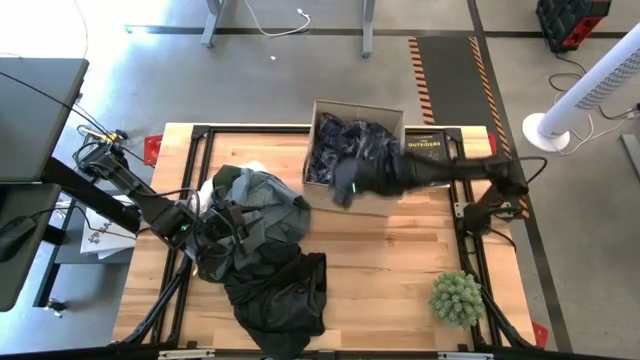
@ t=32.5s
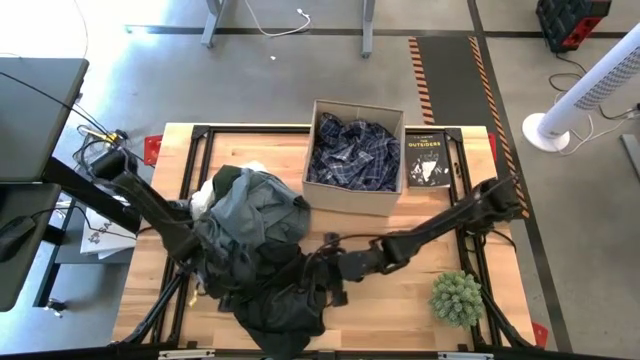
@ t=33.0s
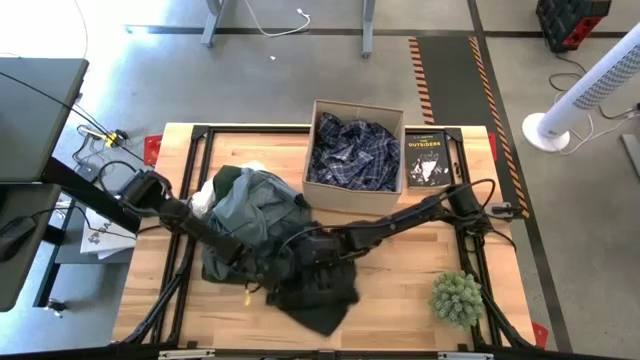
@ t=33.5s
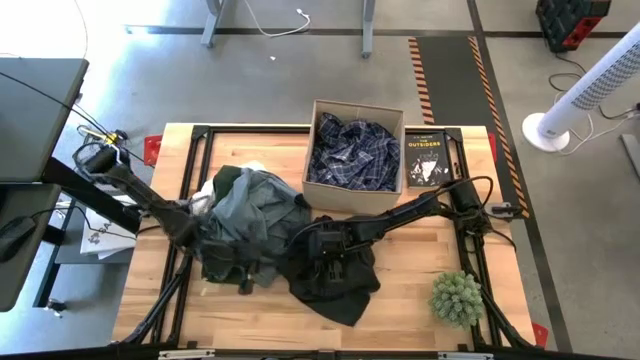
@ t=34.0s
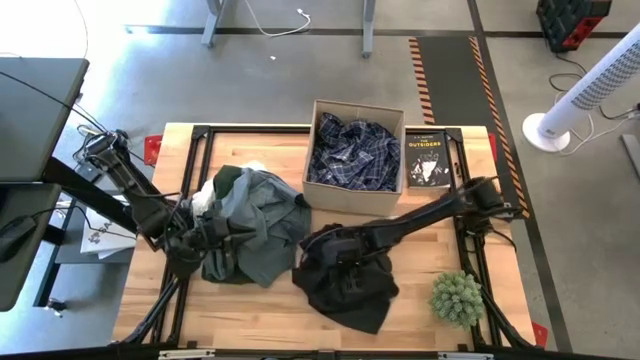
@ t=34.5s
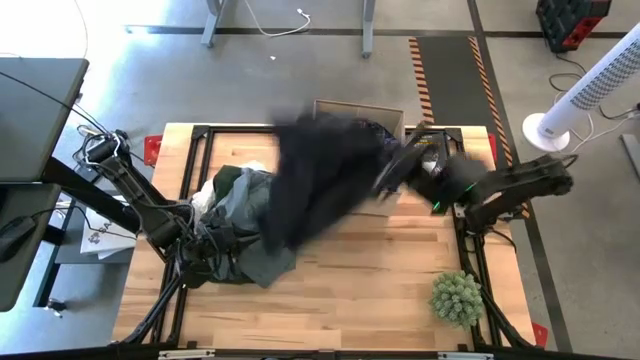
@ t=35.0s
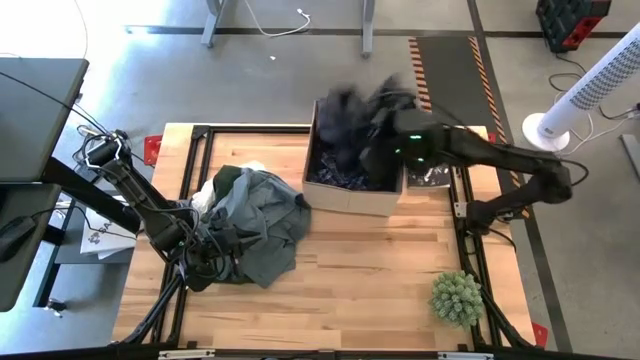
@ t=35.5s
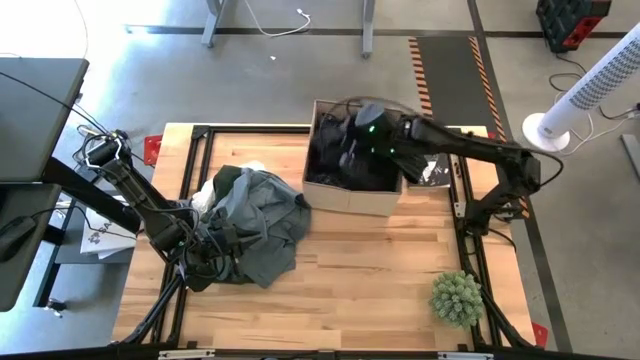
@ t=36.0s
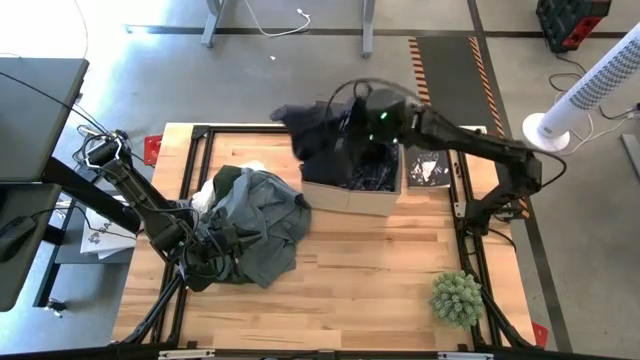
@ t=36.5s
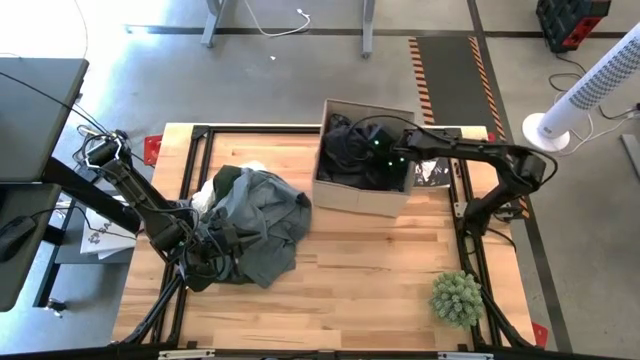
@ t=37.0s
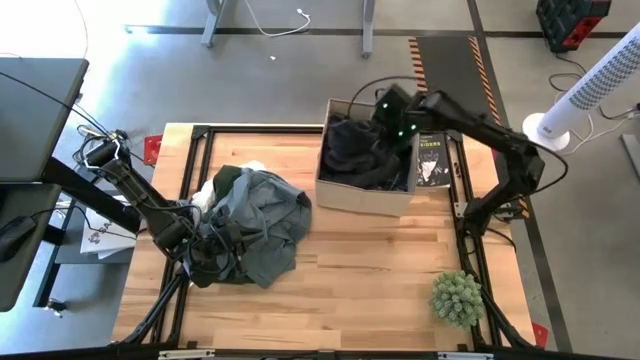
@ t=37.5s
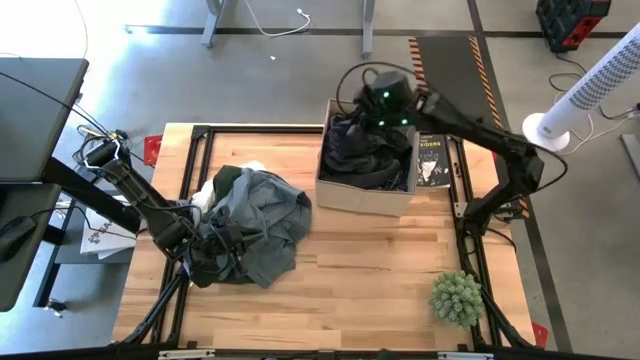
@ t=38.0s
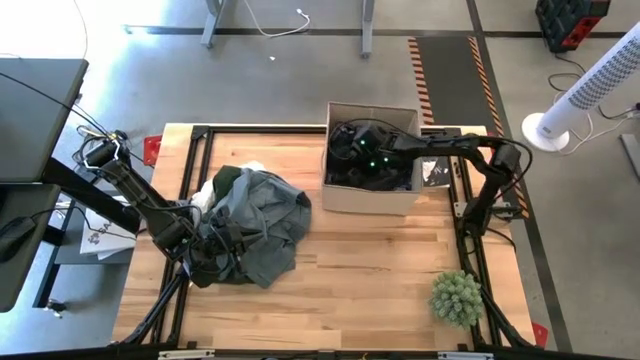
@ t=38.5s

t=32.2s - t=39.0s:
Task: Sort clothes
Put the black shorts into the laundry organizer

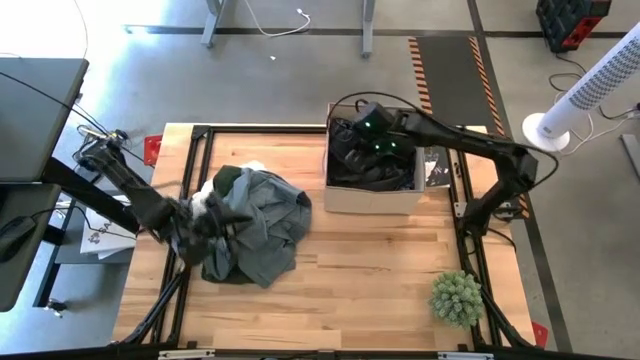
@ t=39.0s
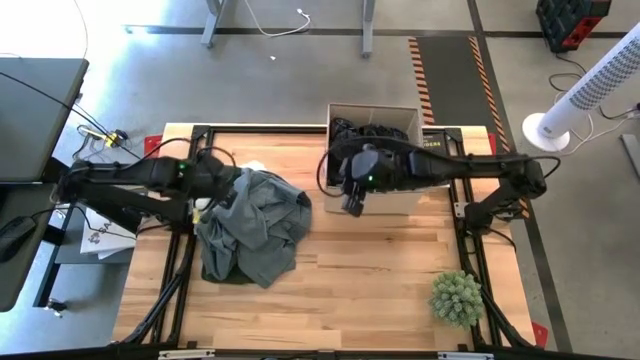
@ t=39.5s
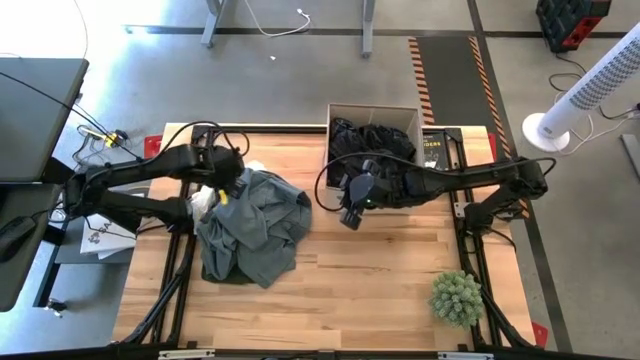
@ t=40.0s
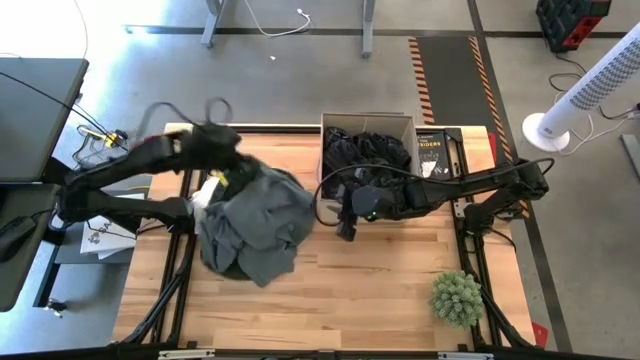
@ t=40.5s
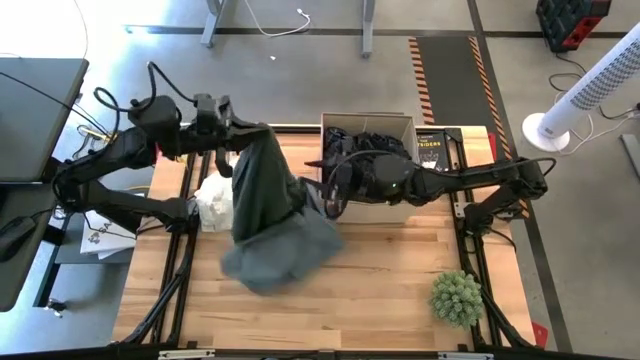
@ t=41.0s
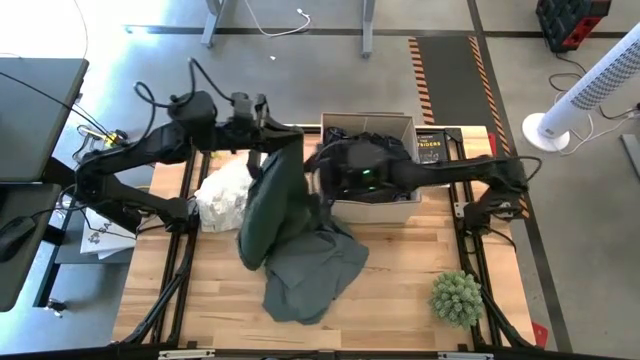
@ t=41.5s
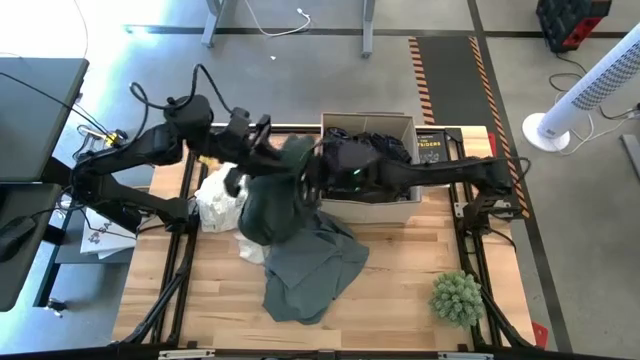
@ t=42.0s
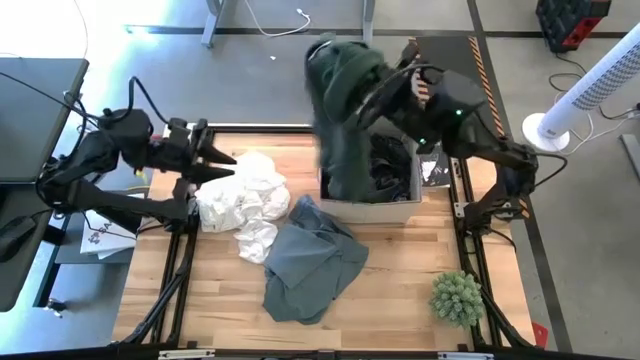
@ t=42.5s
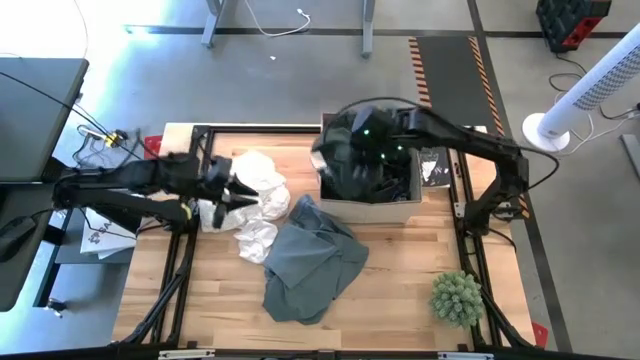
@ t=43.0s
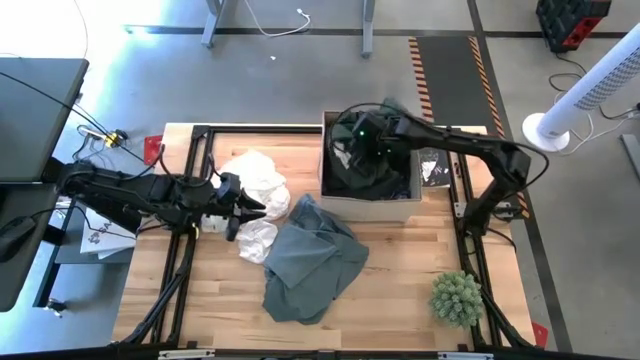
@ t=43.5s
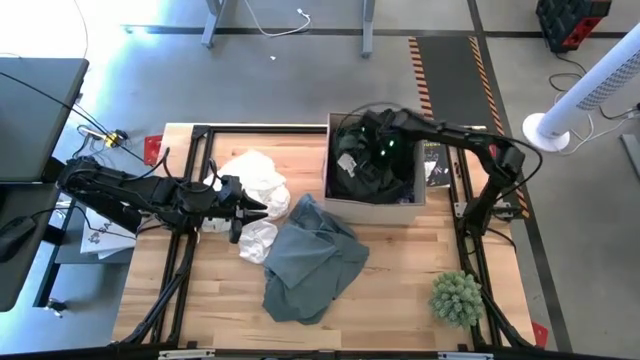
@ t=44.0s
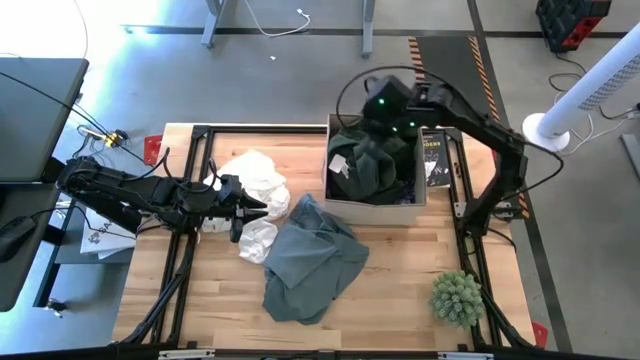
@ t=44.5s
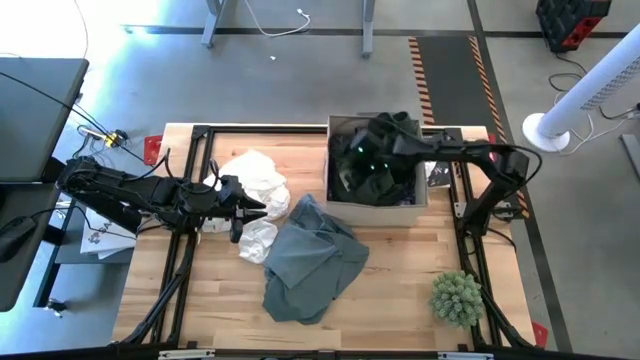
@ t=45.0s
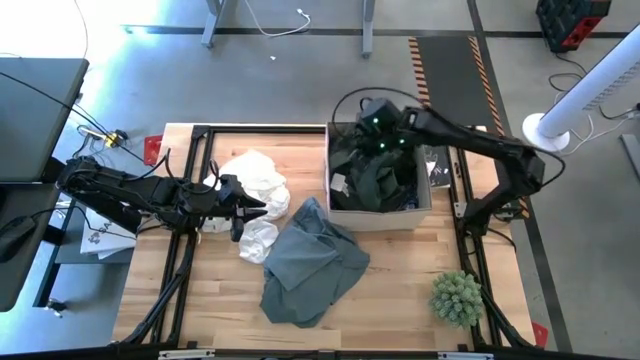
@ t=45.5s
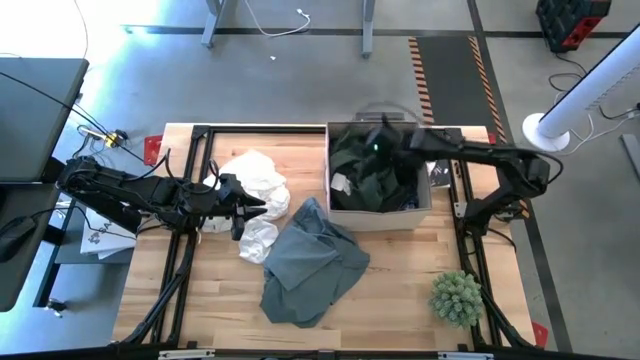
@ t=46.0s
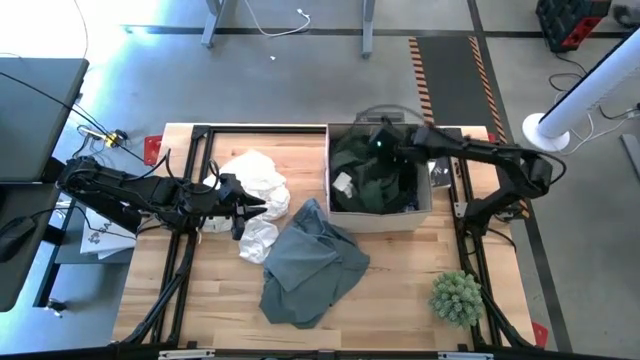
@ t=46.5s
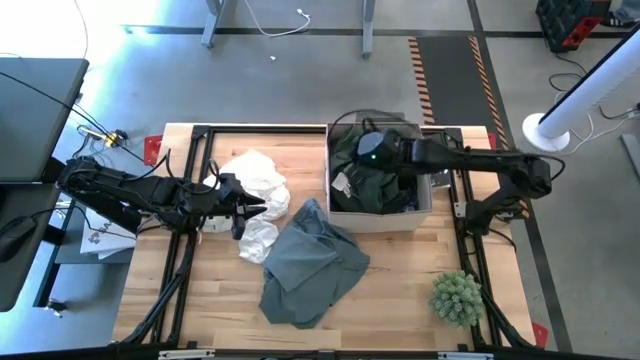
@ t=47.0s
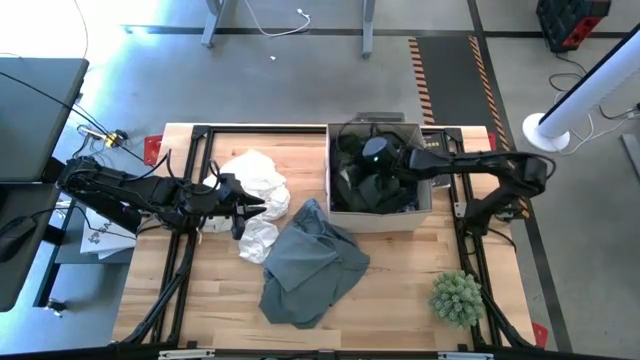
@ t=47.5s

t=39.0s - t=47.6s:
Put the green sweater into the laundry organizer

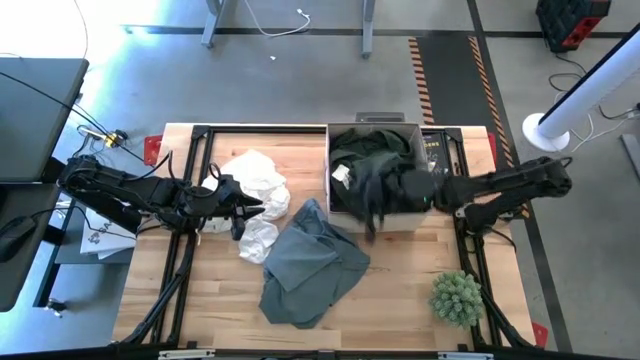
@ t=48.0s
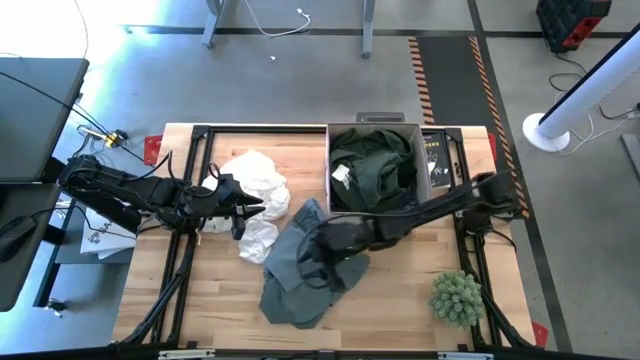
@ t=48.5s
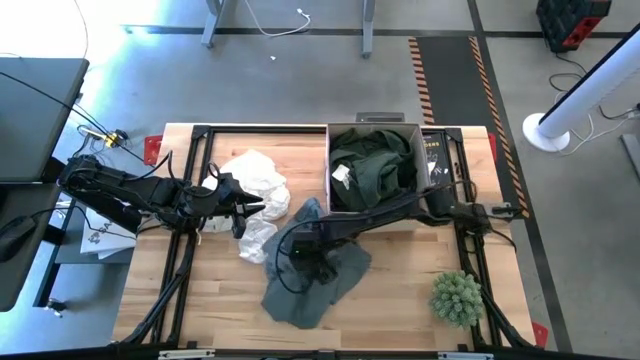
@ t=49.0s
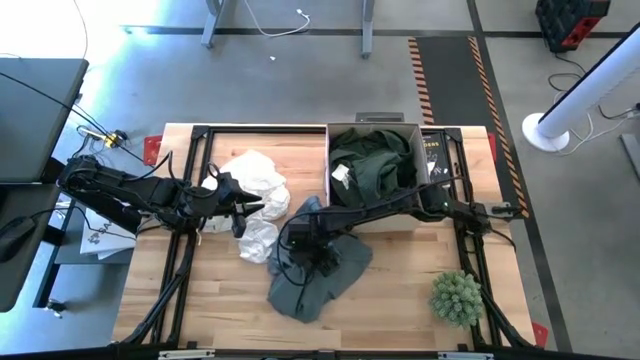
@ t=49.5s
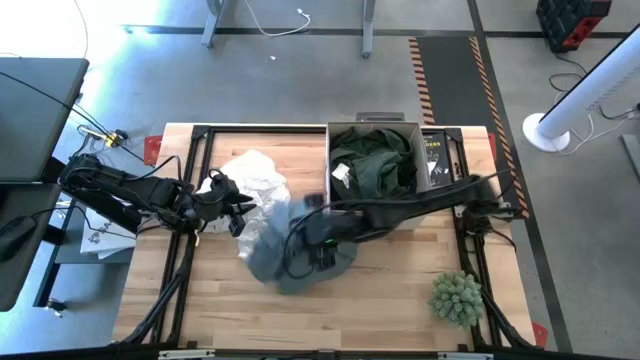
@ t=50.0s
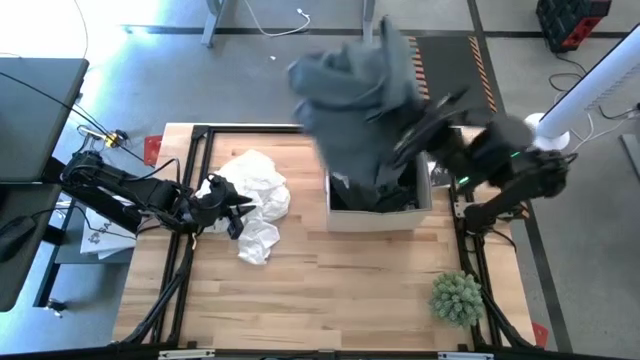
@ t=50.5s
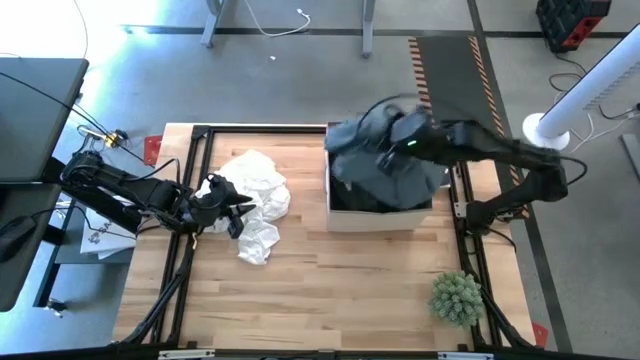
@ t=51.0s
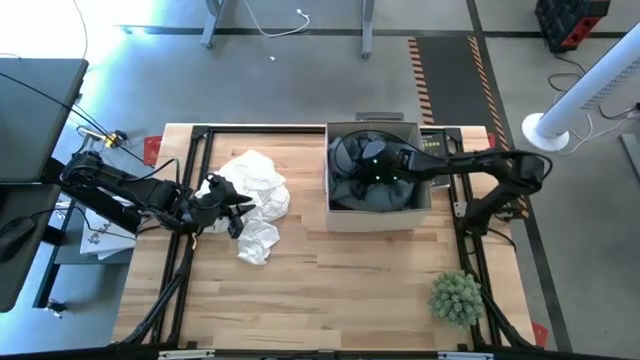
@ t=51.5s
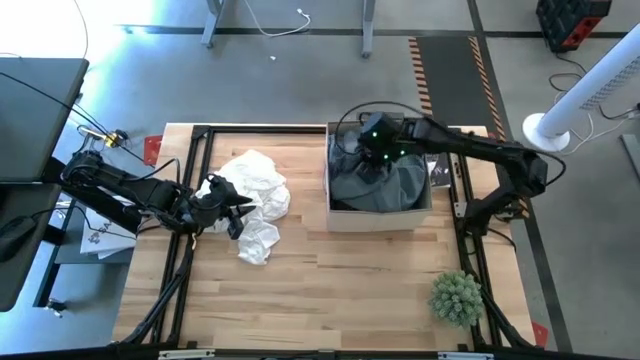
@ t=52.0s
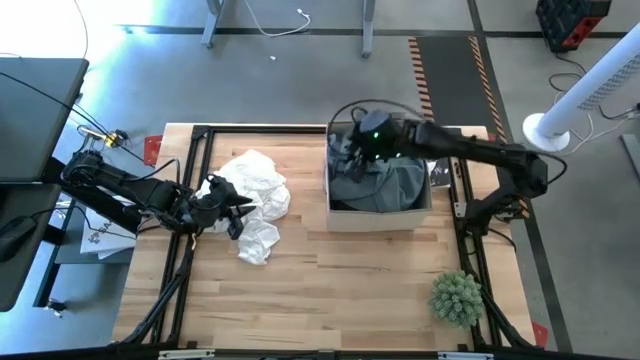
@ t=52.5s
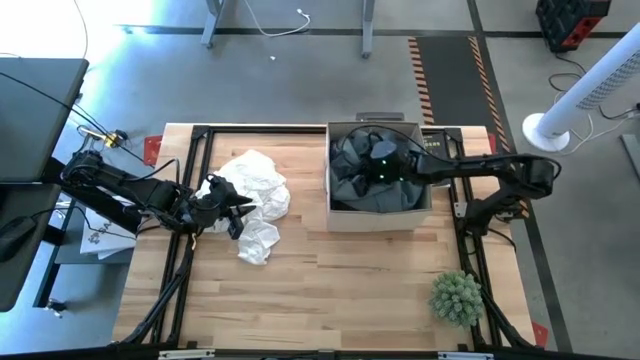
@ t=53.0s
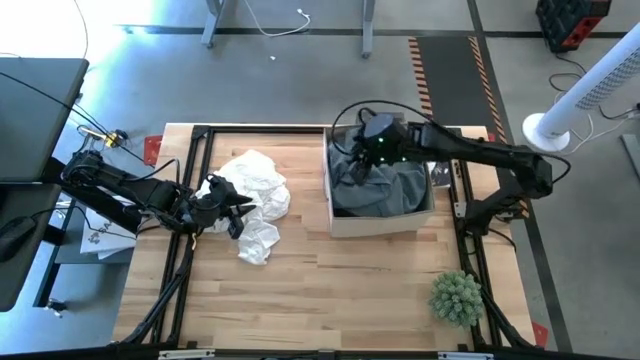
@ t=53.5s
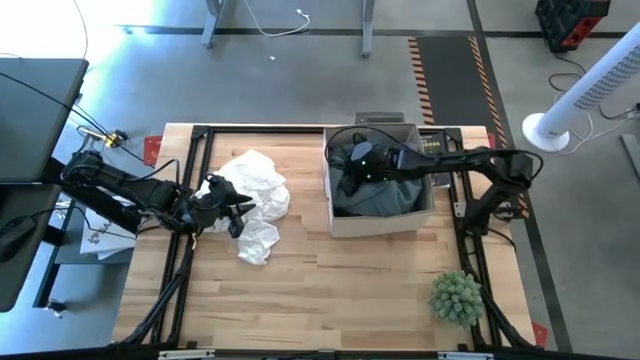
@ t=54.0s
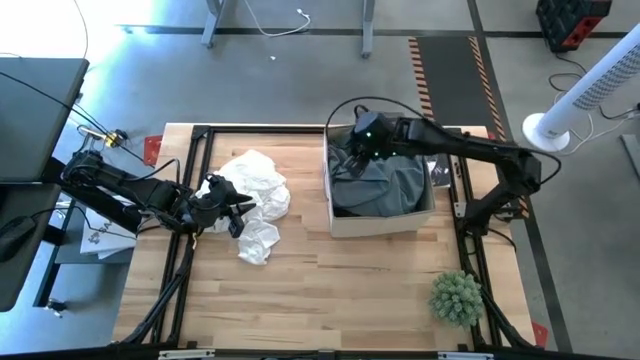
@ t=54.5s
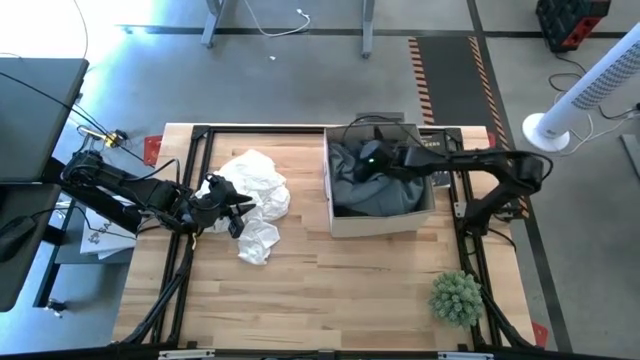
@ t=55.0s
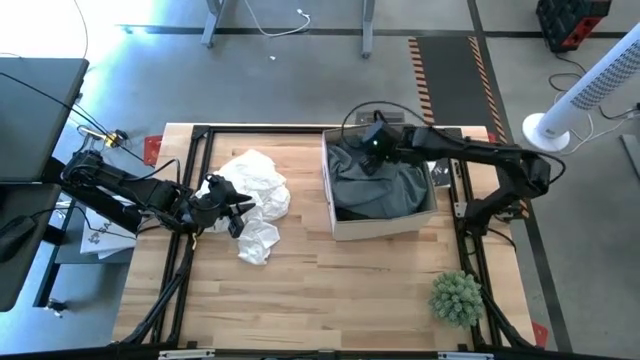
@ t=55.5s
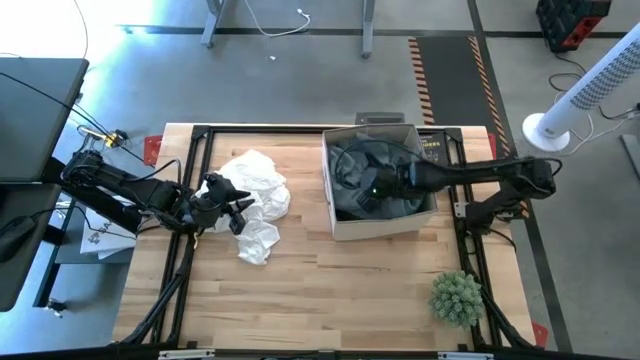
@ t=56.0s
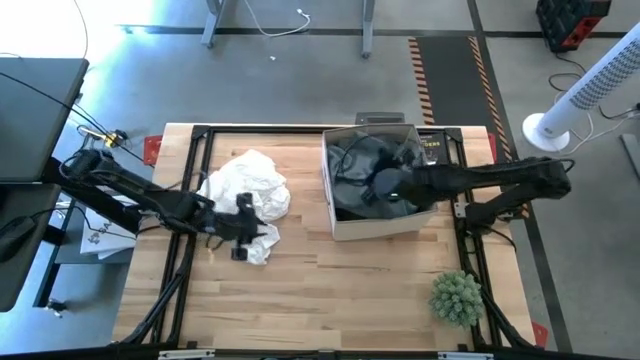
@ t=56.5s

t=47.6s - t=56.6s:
Put the gray pants into the laundry organizer
